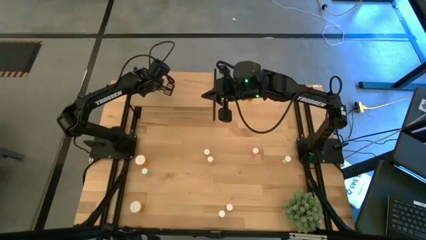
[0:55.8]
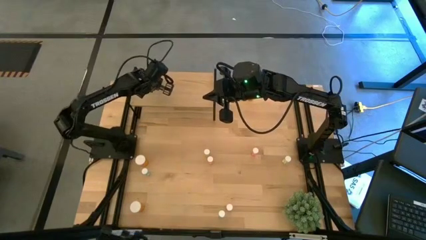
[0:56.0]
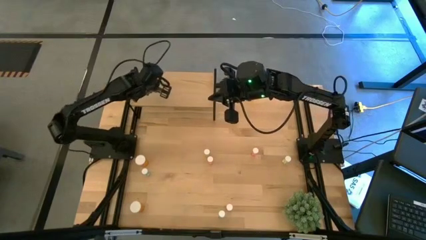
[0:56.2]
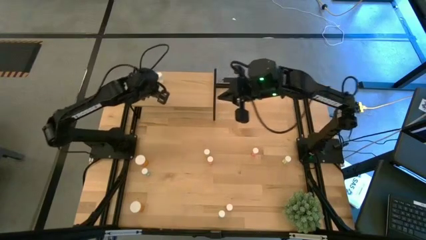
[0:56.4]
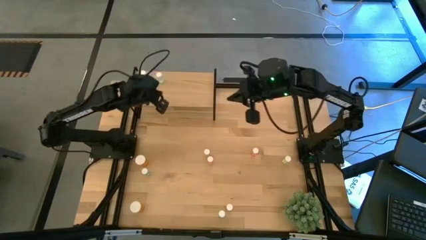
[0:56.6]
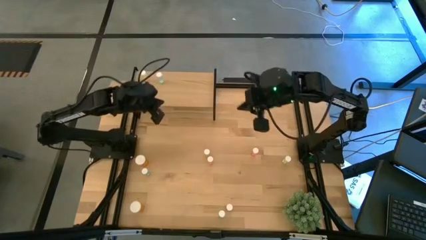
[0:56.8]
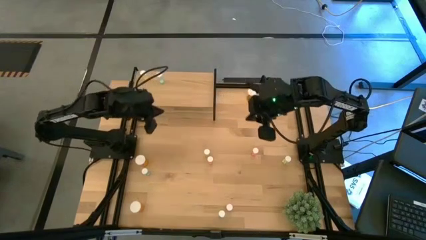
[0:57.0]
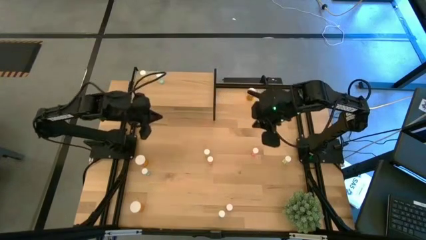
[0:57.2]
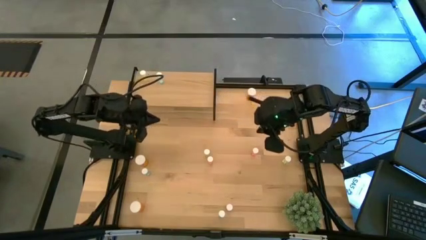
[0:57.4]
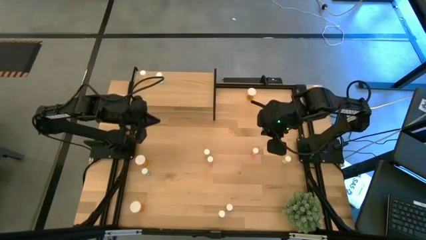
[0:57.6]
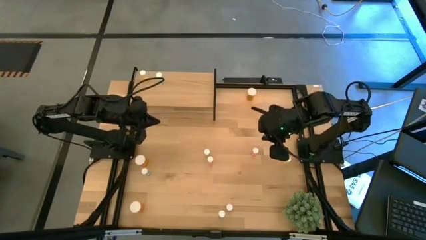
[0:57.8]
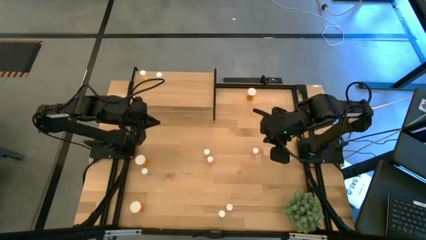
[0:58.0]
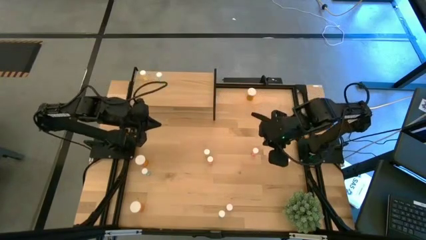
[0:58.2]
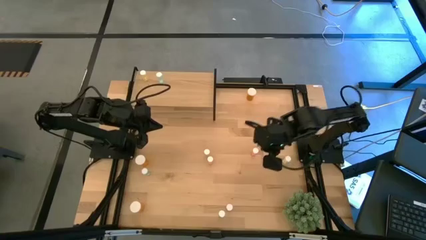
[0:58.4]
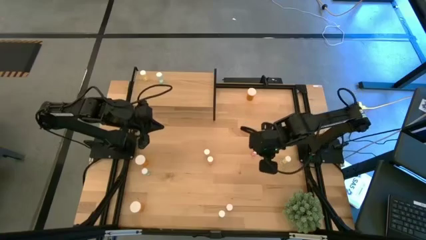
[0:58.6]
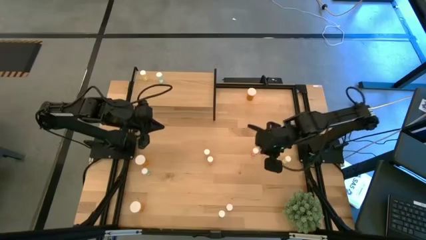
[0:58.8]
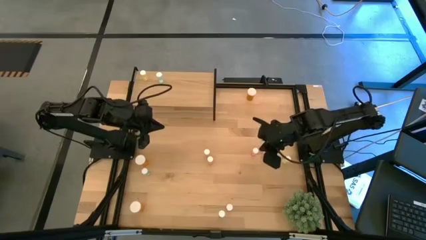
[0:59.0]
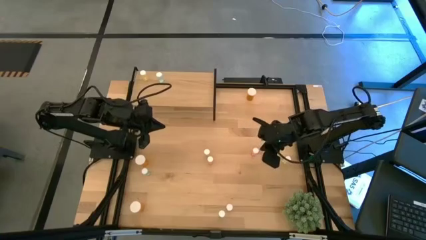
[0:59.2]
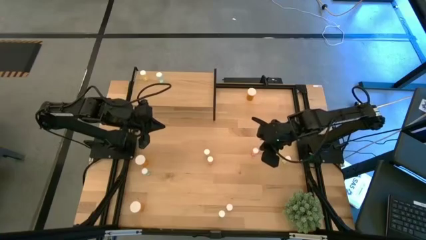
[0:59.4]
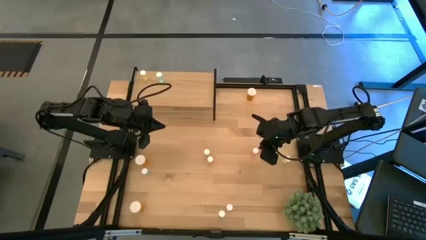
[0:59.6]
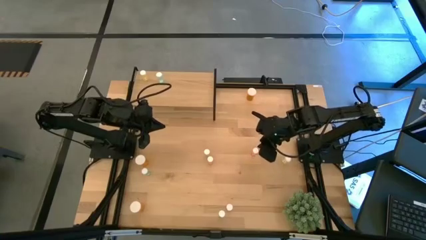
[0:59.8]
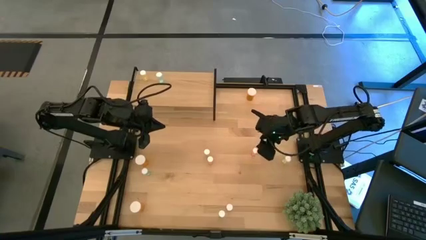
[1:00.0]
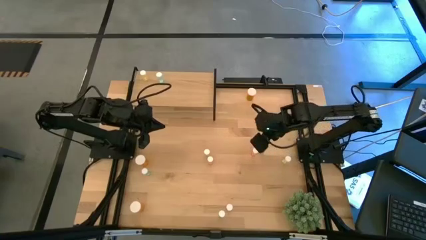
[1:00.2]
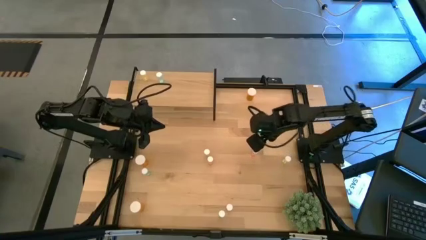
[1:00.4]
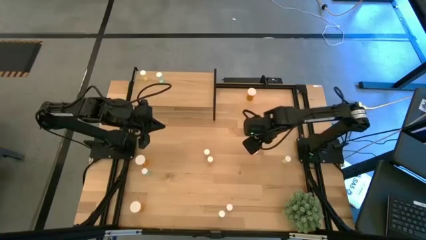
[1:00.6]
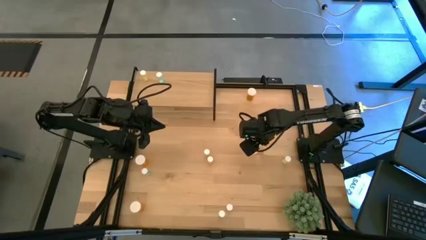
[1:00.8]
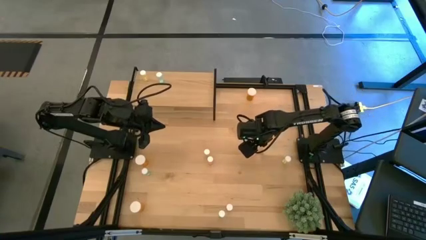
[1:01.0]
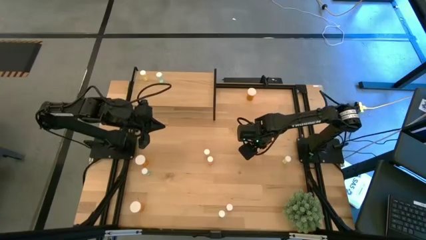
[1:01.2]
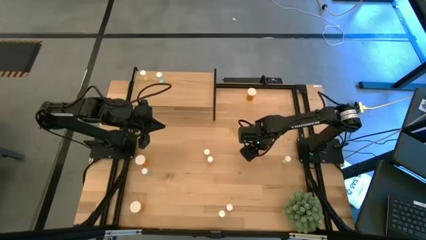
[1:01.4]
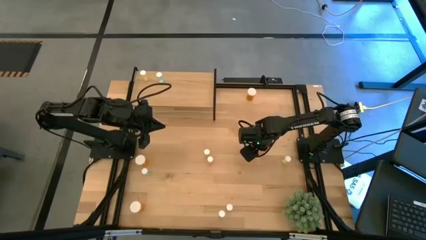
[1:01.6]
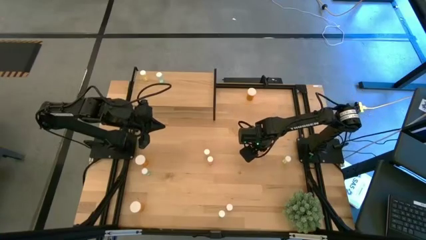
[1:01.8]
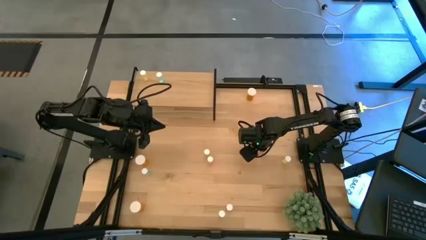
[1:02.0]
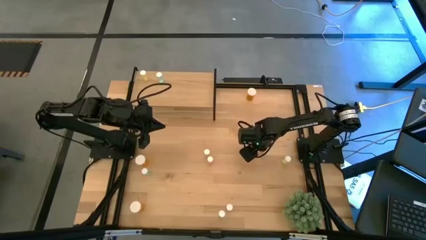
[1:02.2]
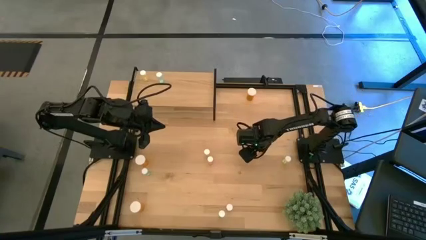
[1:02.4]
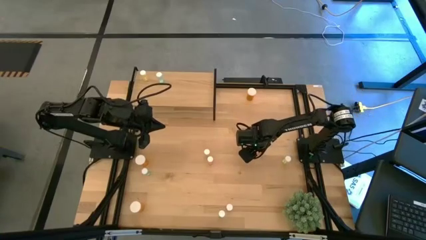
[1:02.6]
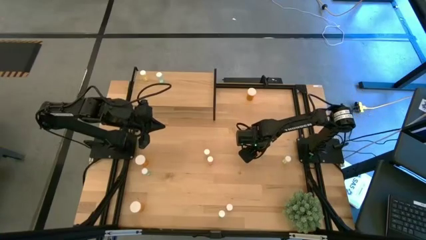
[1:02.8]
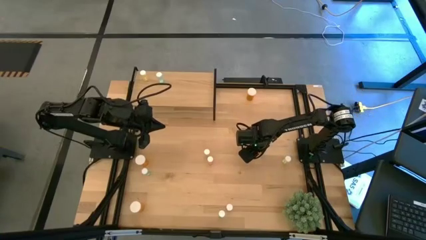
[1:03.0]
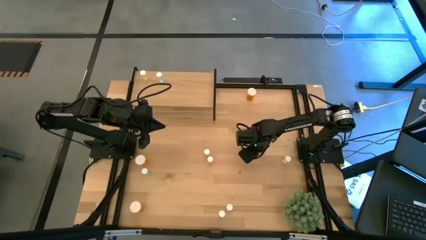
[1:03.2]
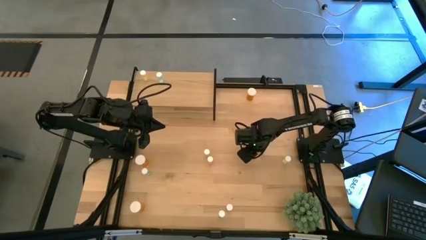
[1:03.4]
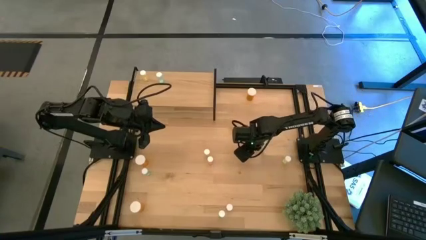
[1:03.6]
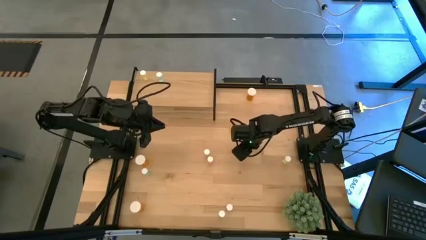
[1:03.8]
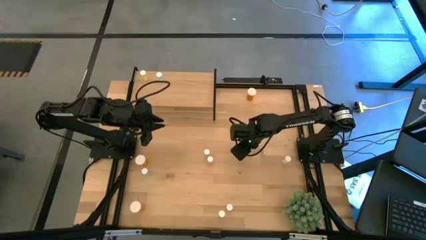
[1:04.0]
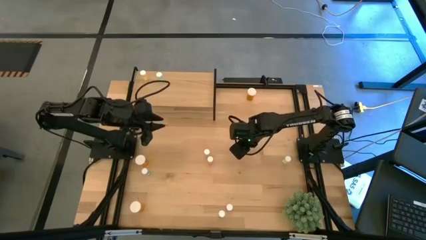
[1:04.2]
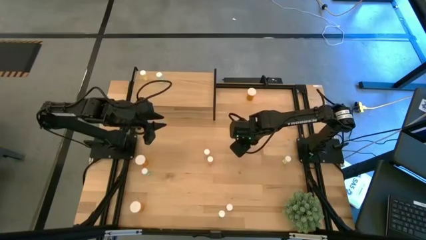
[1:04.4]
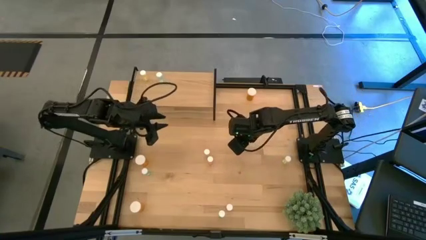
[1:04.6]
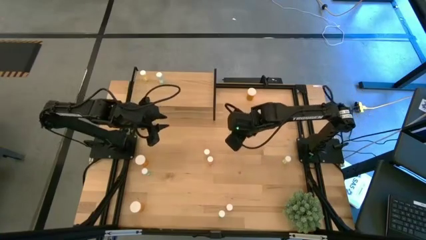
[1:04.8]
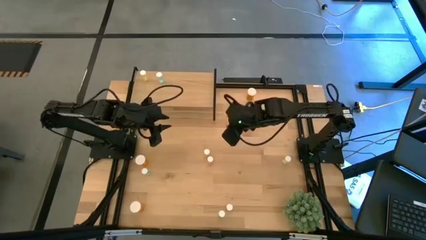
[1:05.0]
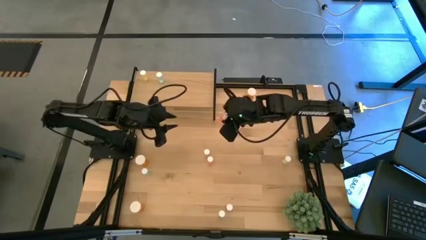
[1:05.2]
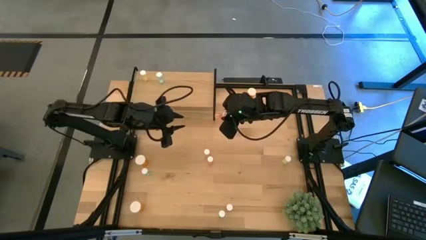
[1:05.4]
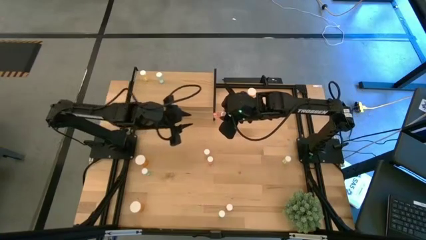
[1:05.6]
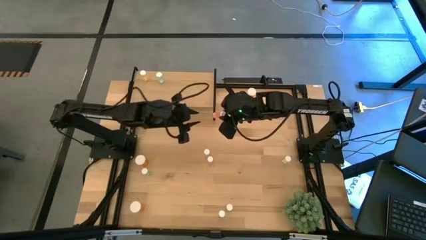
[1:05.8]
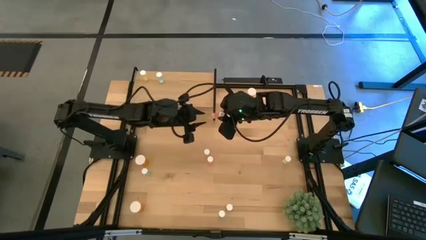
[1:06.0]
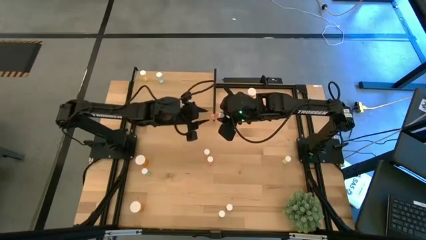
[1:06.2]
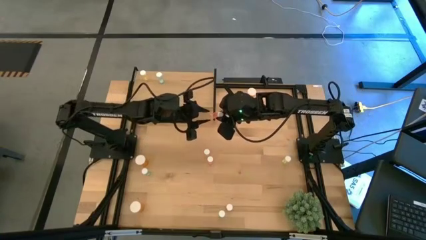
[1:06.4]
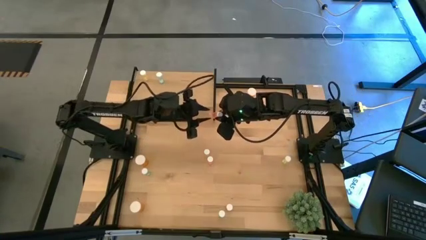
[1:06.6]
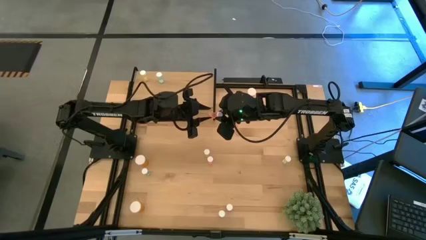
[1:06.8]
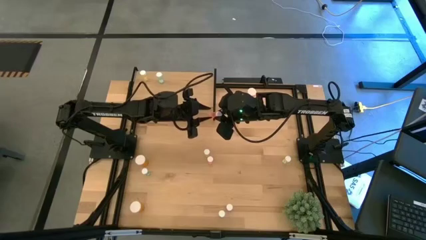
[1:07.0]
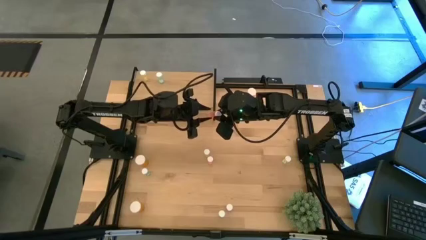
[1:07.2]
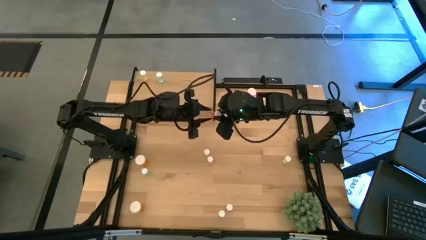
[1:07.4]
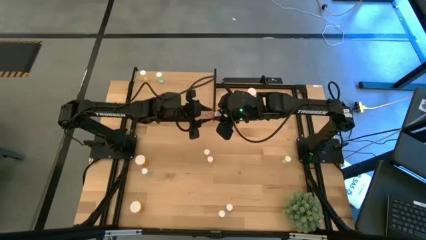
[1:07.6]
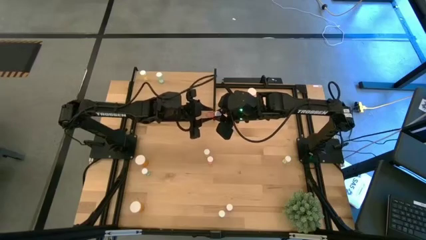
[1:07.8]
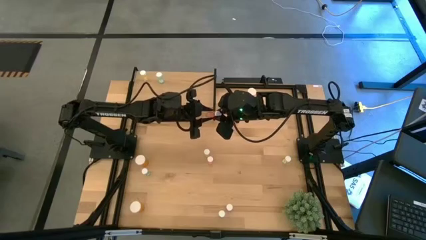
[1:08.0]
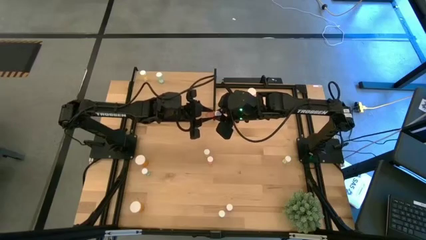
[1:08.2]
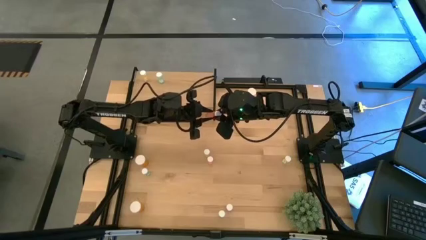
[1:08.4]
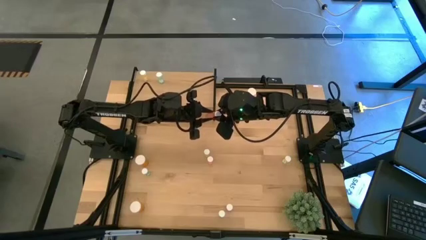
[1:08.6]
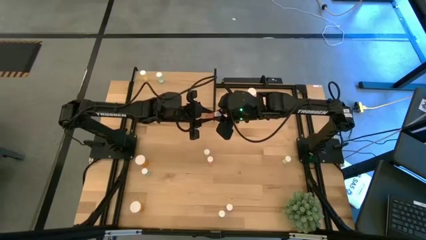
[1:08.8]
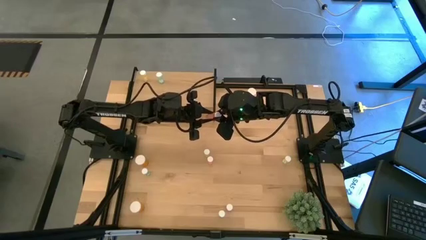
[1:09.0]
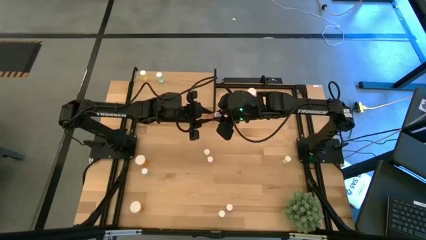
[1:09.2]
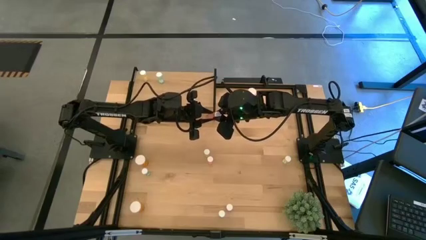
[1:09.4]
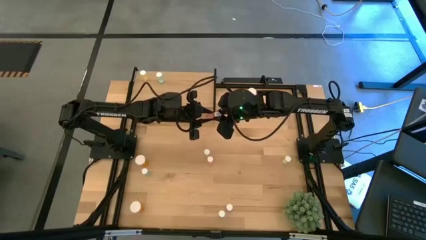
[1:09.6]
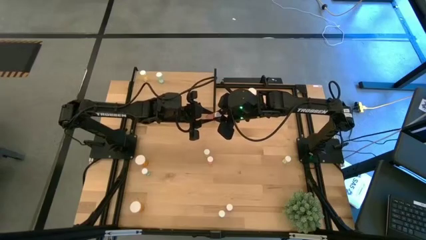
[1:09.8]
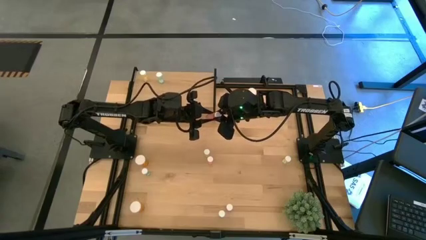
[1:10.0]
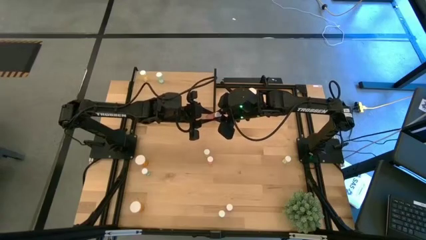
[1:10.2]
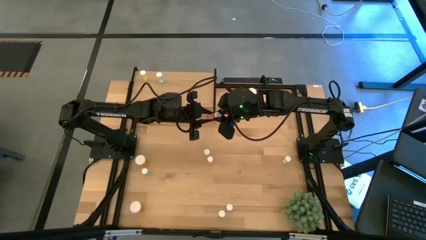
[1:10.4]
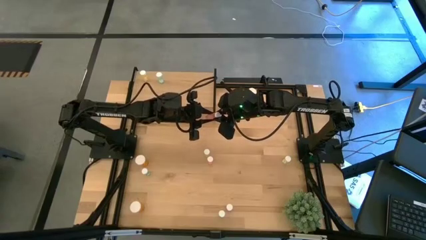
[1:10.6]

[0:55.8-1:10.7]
Task: Pick and place medicine bottles onto shelf by color
Put the top right small red pill bottle on the shelf
